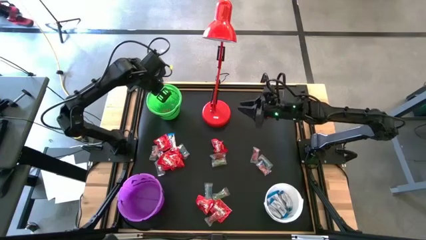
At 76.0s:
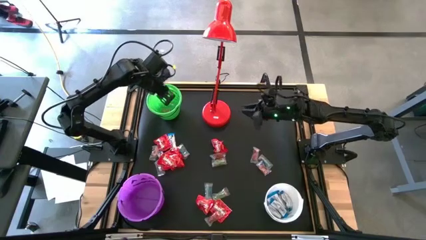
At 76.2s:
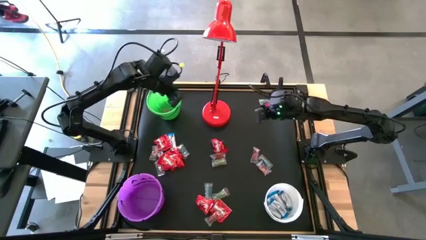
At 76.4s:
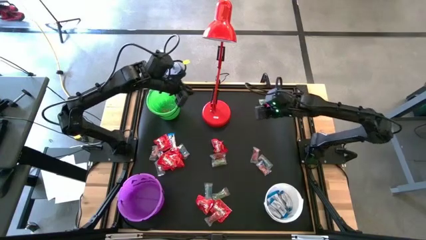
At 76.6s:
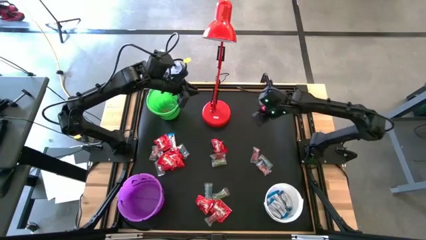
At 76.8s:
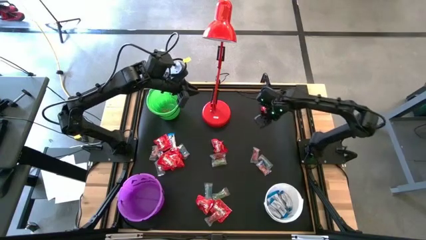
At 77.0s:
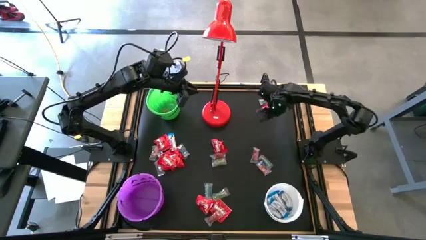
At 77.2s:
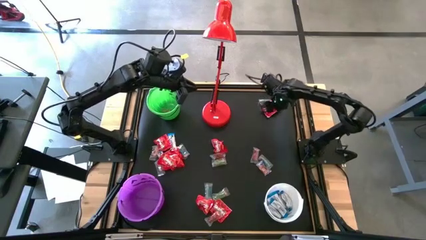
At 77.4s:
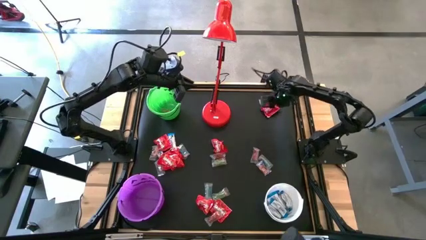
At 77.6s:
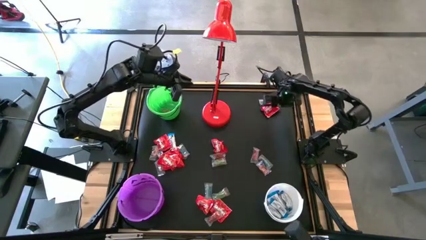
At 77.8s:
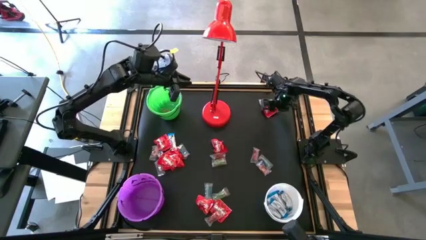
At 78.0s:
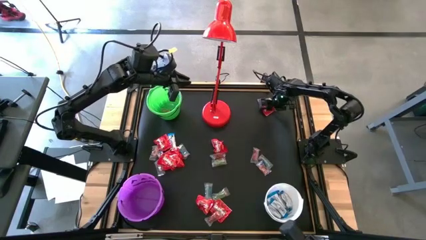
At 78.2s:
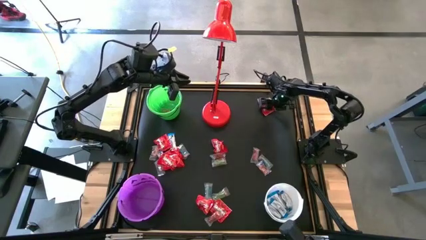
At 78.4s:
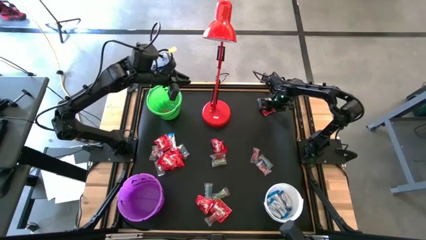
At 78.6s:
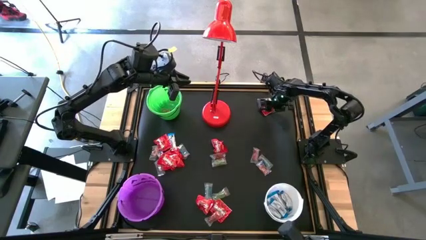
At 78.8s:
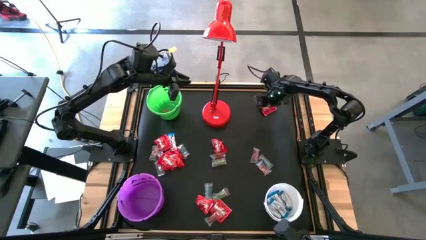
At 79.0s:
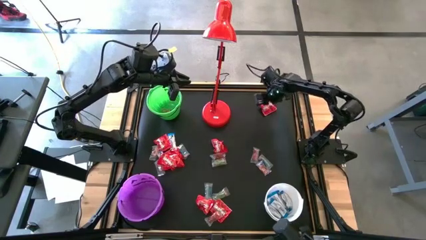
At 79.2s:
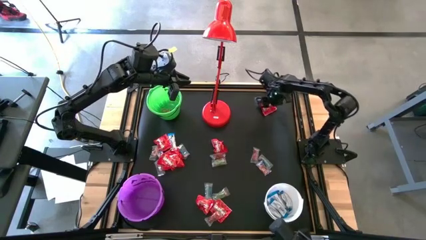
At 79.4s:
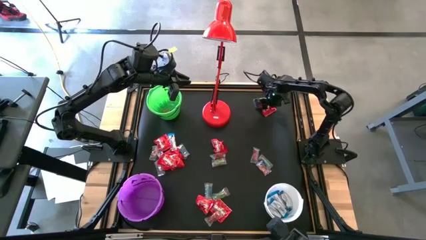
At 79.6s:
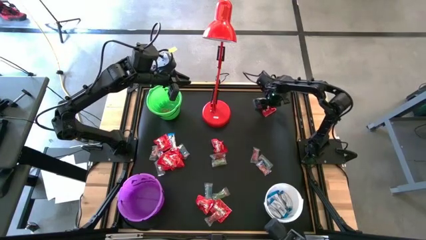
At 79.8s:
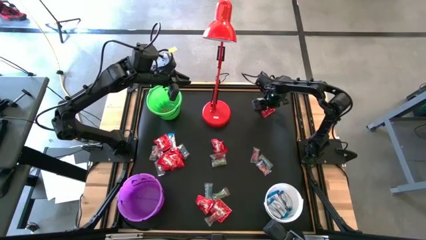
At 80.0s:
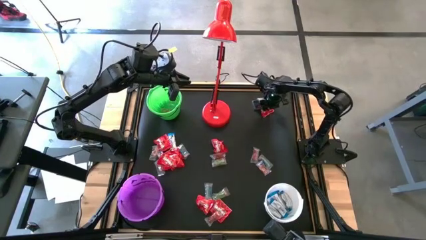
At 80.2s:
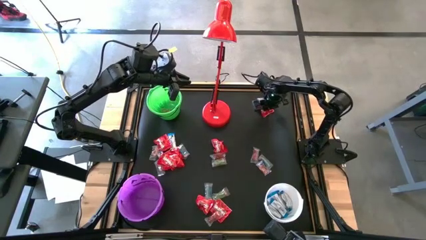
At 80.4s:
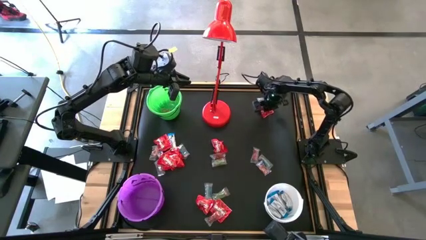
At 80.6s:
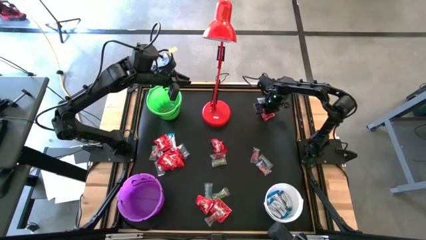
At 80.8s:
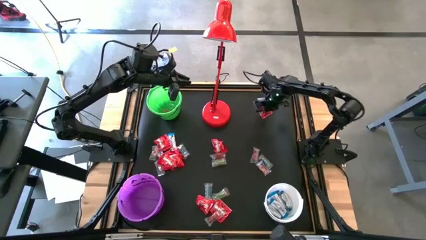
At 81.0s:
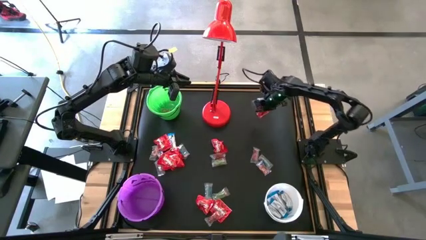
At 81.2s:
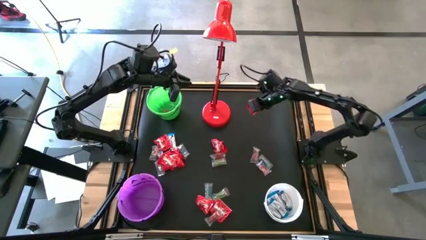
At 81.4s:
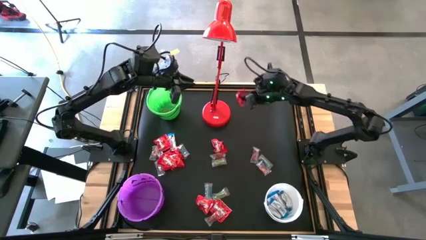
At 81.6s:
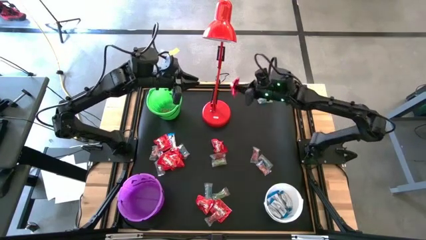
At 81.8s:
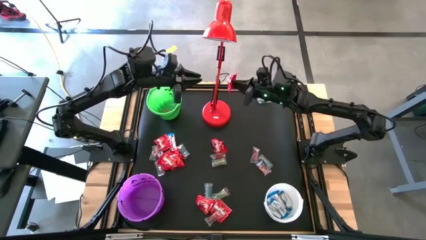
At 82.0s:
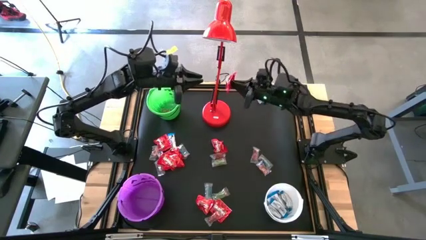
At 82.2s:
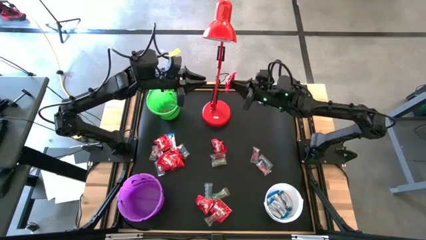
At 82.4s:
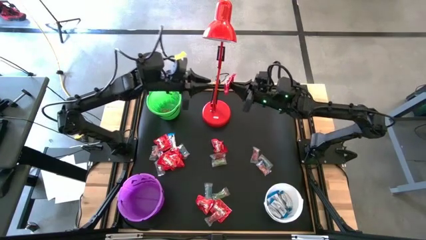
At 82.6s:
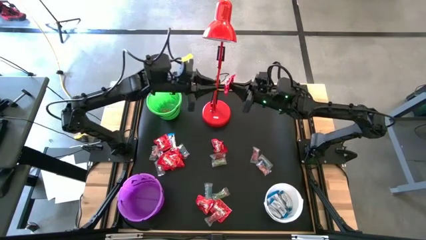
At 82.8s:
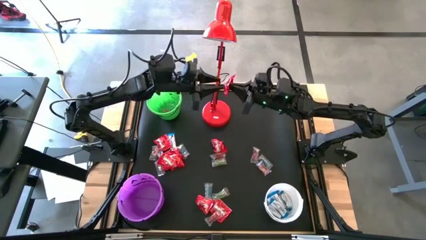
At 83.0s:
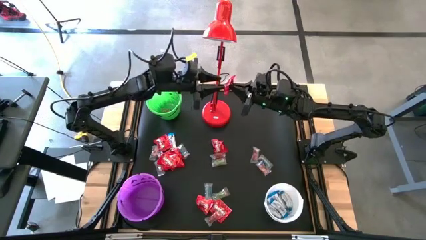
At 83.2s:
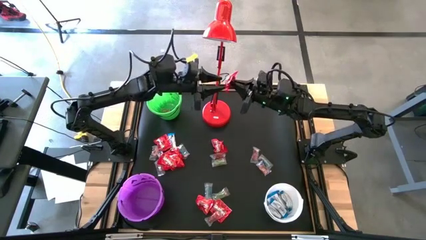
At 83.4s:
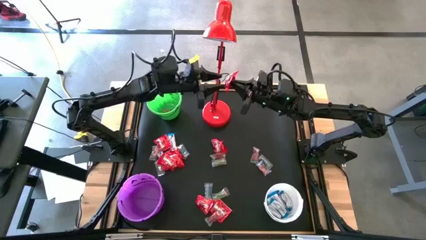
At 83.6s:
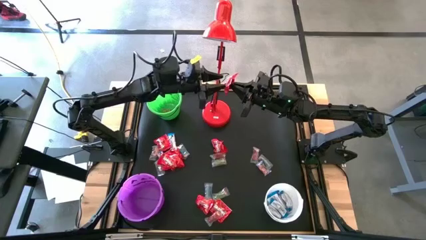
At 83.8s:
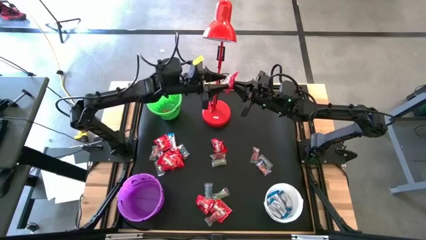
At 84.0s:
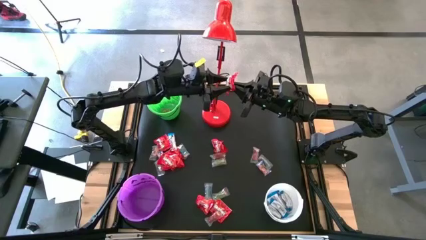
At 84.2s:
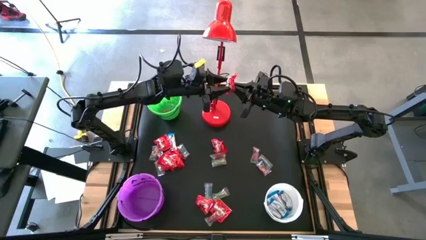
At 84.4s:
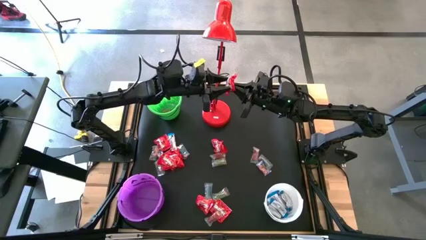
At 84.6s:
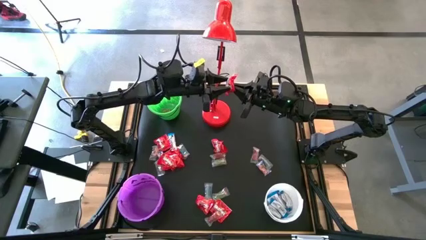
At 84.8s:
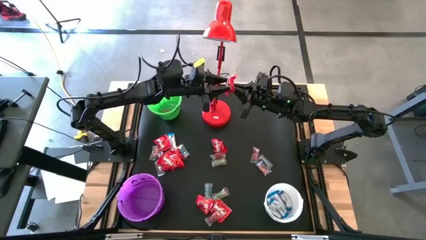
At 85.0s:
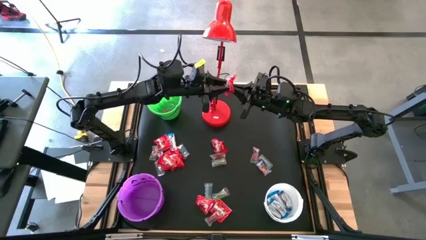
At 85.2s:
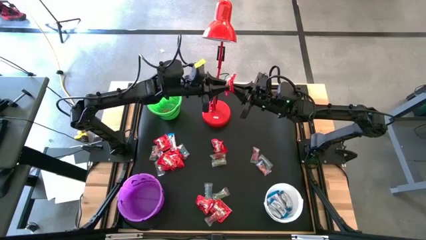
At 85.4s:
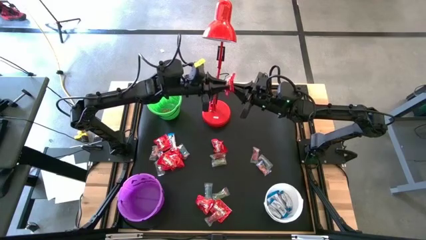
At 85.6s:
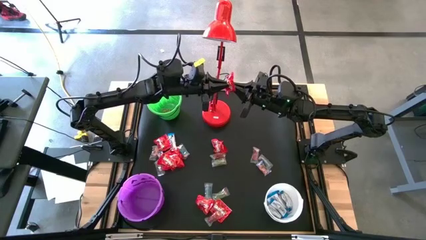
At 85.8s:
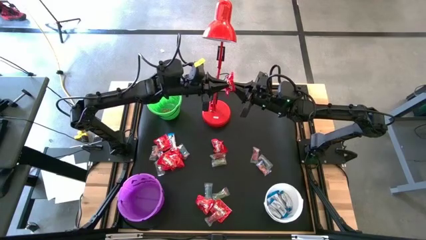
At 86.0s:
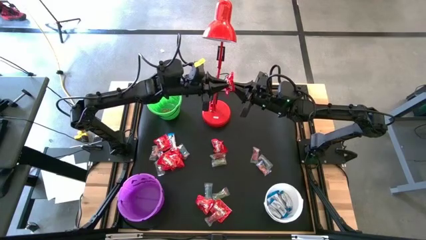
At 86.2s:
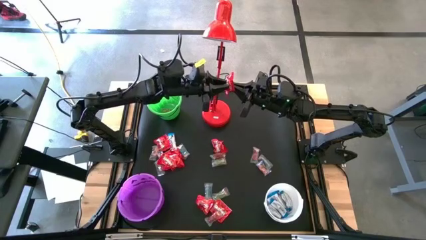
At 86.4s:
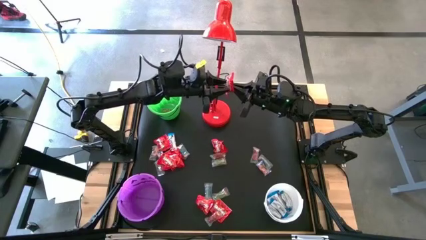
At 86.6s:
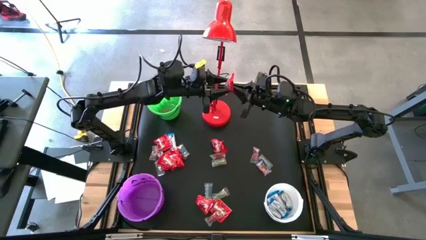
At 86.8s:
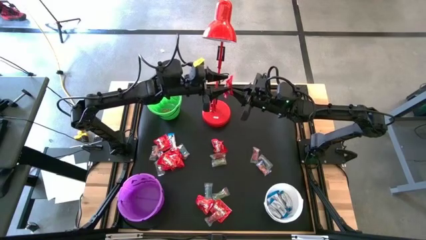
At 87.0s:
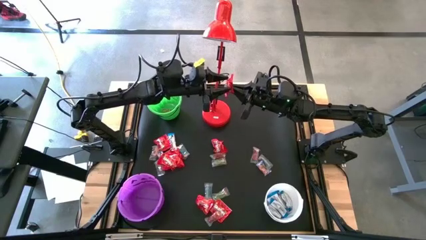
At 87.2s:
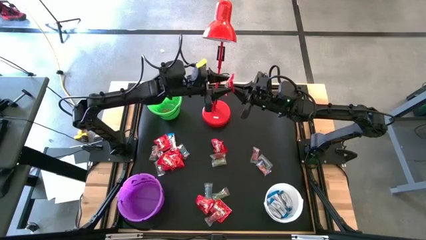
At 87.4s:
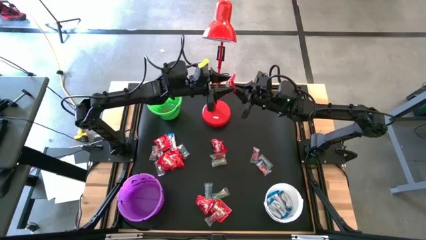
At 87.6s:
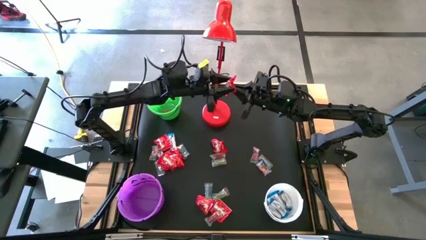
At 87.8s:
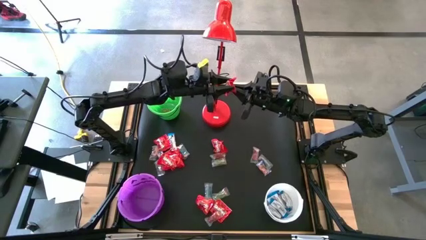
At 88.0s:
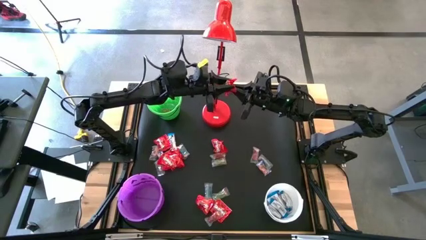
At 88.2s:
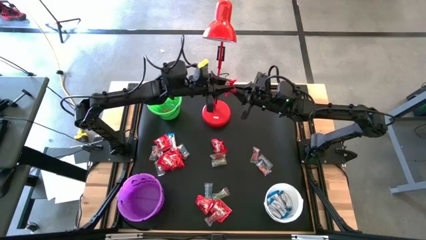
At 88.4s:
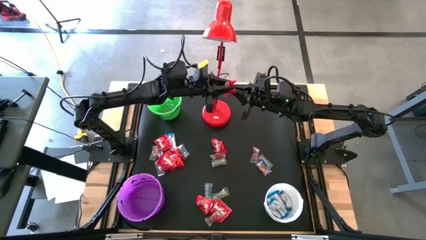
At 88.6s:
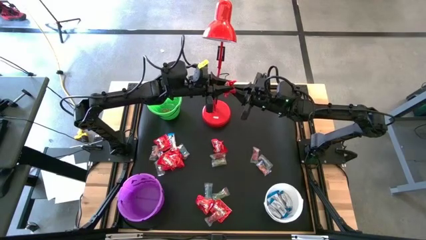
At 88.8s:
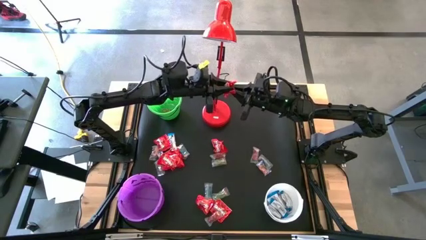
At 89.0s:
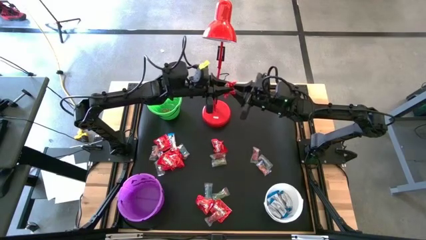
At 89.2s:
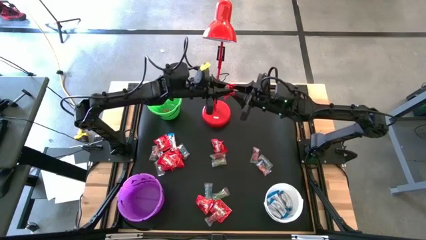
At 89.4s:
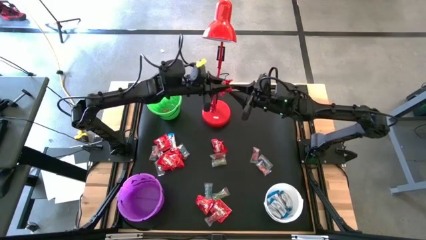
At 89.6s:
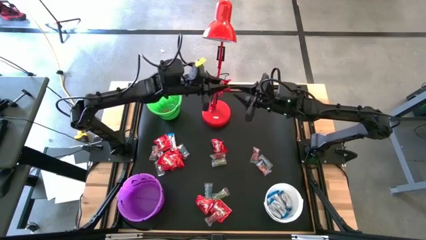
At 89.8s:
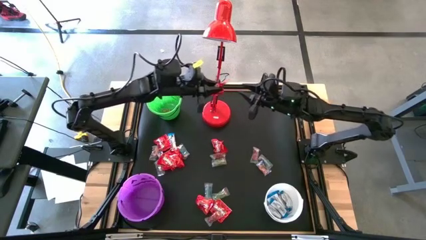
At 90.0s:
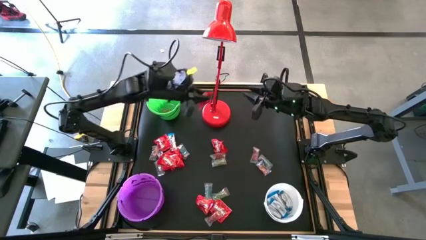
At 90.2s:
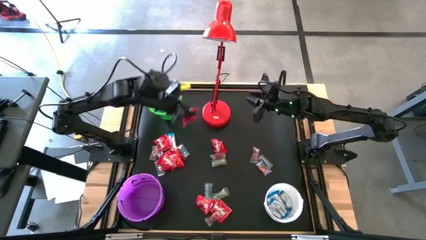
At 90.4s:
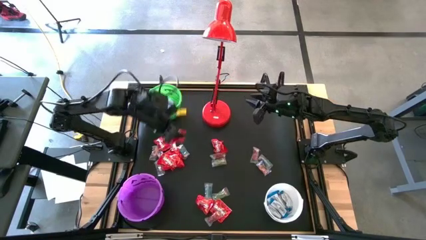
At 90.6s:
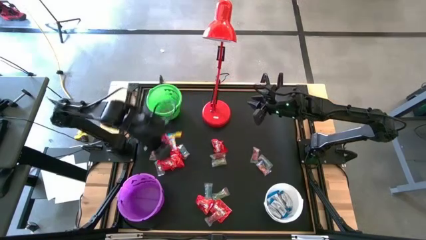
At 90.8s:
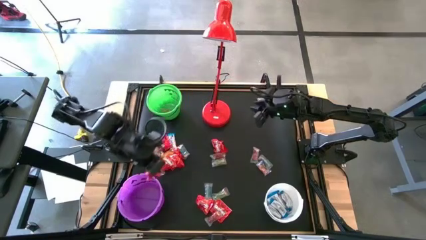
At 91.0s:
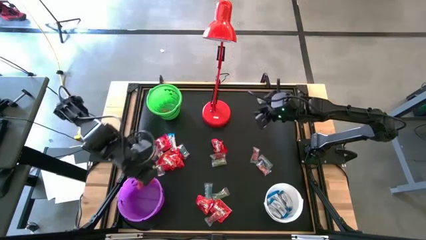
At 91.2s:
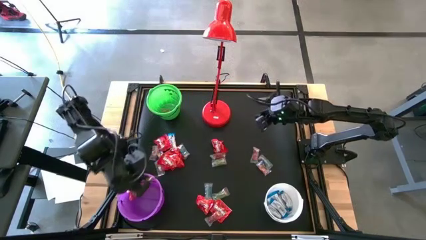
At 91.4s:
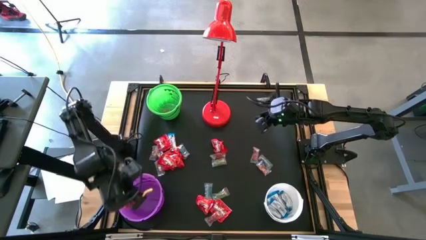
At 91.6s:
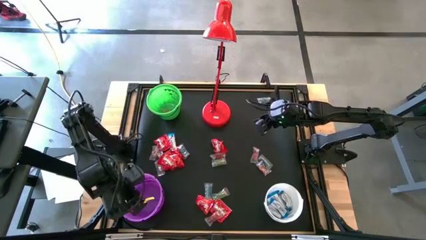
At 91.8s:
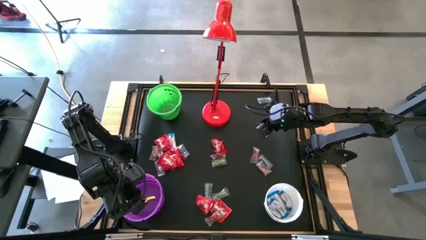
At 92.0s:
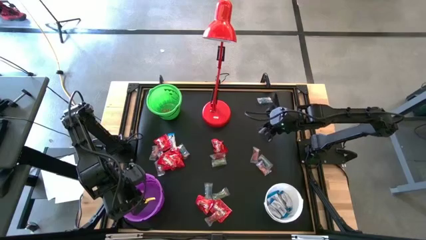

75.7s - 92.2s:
Task: Sort candy
Put the red candy into the purple bucket
